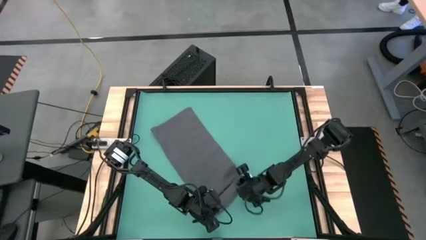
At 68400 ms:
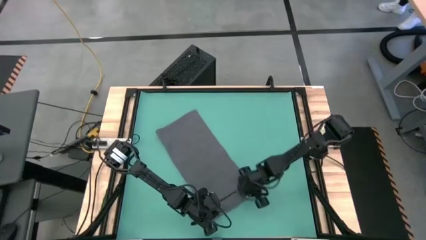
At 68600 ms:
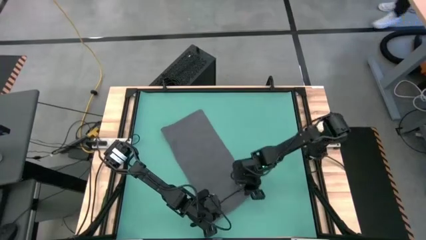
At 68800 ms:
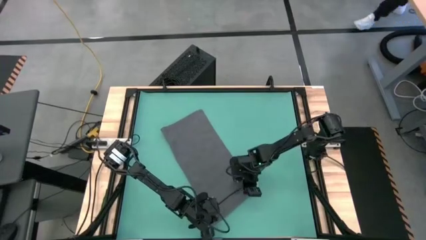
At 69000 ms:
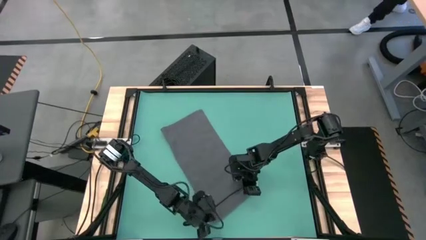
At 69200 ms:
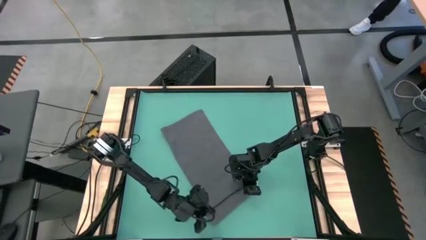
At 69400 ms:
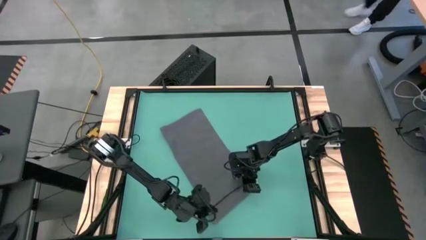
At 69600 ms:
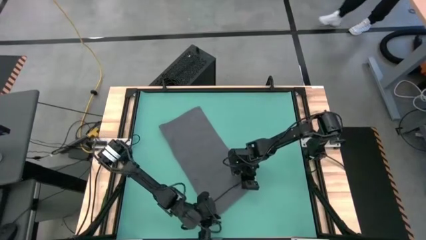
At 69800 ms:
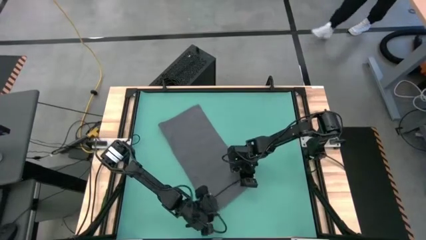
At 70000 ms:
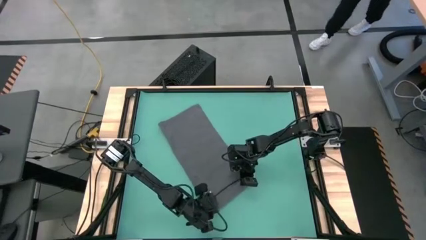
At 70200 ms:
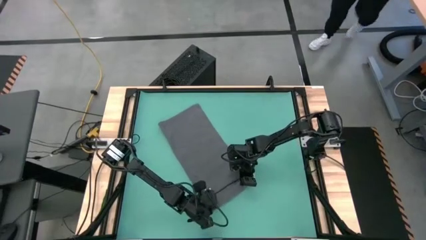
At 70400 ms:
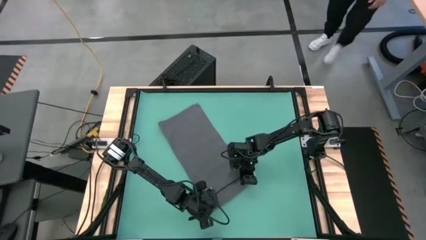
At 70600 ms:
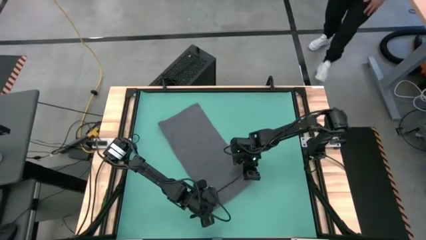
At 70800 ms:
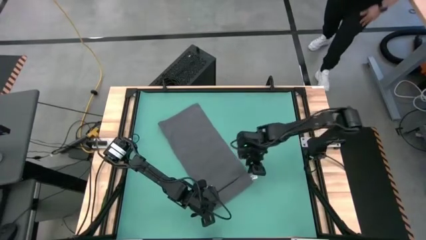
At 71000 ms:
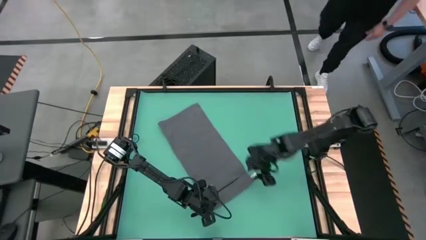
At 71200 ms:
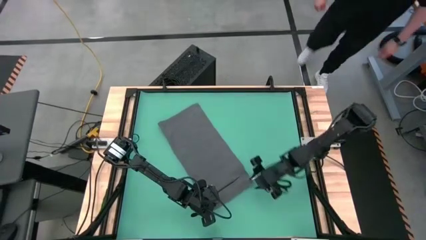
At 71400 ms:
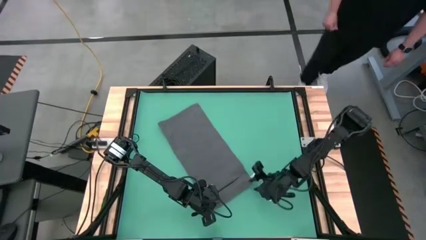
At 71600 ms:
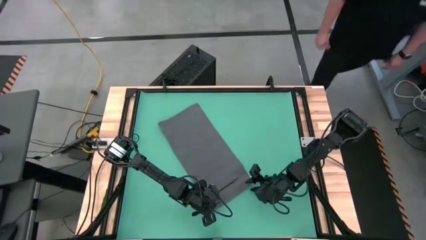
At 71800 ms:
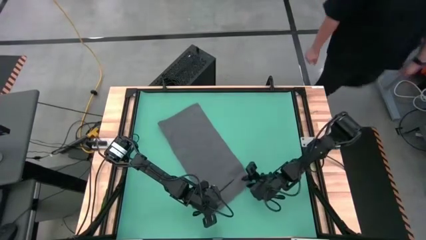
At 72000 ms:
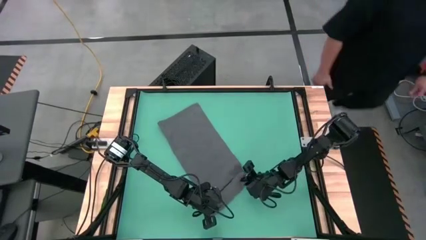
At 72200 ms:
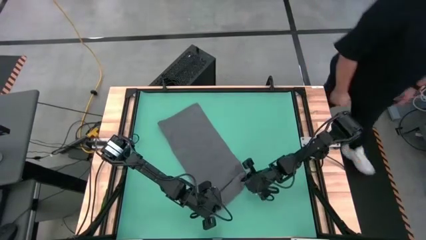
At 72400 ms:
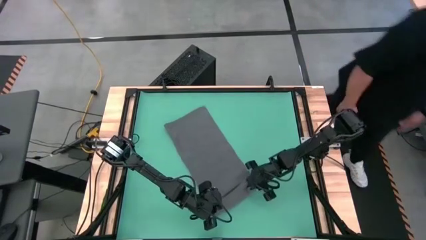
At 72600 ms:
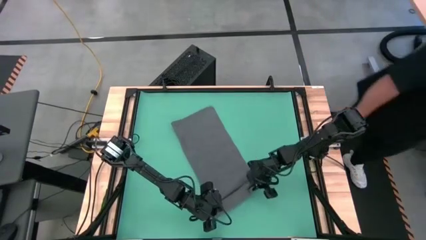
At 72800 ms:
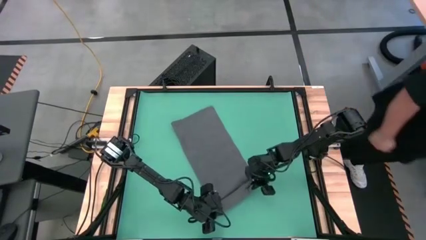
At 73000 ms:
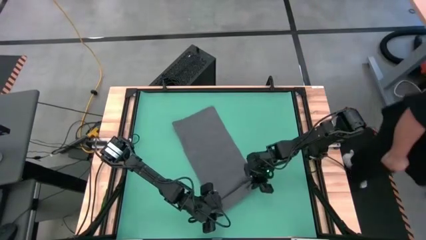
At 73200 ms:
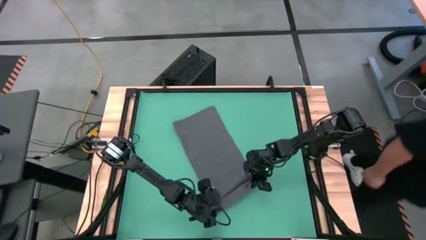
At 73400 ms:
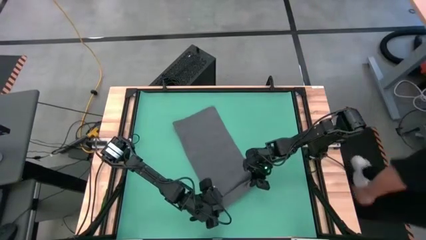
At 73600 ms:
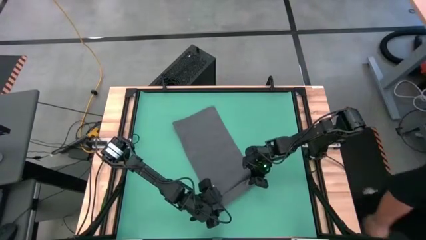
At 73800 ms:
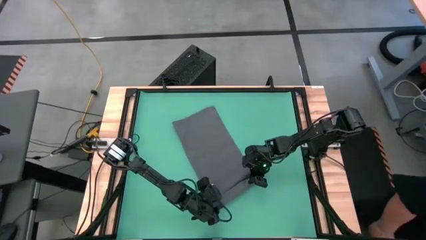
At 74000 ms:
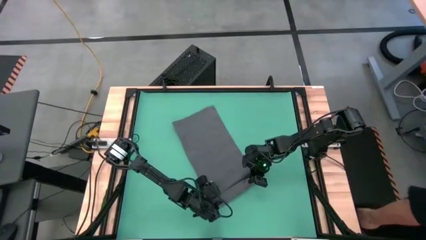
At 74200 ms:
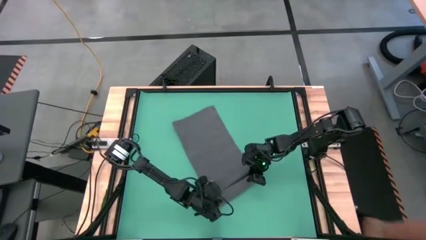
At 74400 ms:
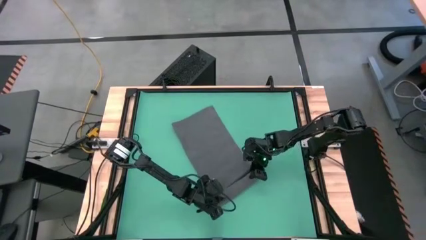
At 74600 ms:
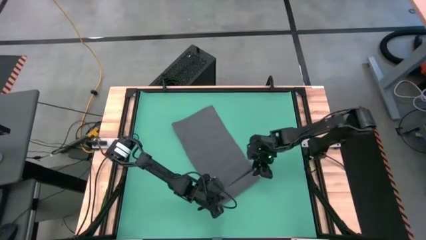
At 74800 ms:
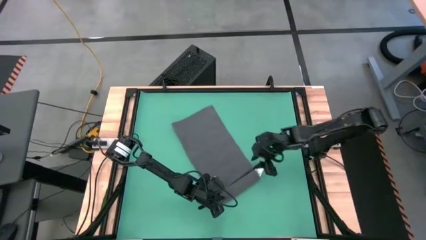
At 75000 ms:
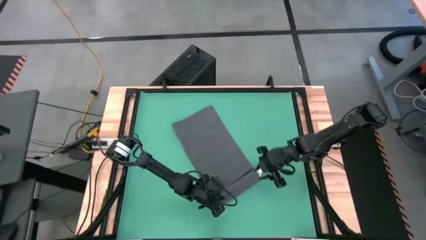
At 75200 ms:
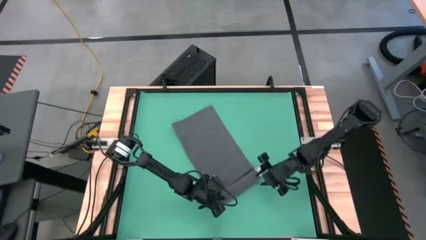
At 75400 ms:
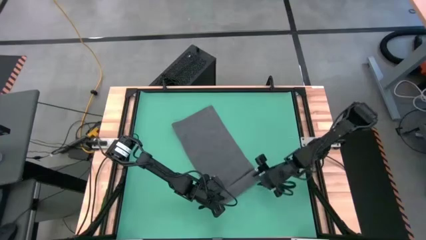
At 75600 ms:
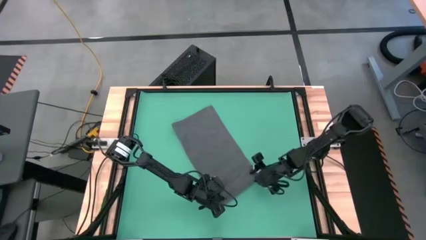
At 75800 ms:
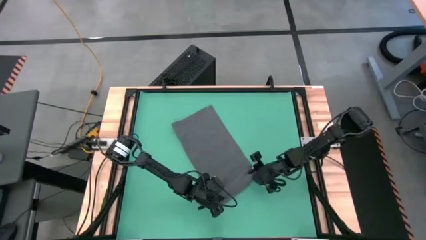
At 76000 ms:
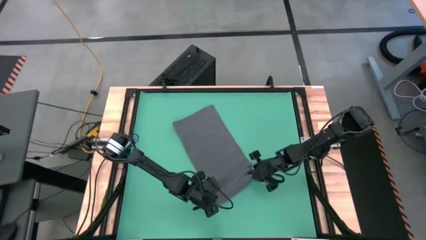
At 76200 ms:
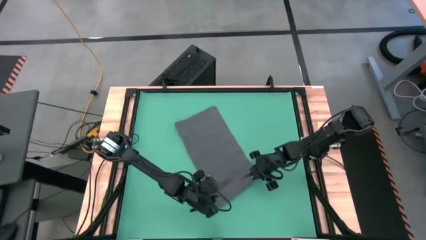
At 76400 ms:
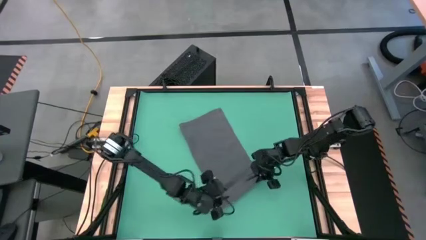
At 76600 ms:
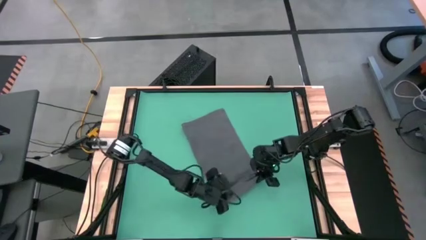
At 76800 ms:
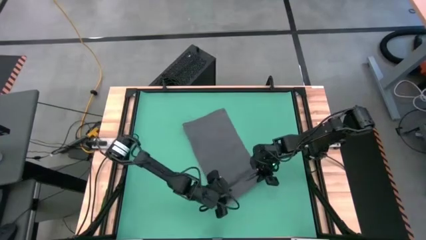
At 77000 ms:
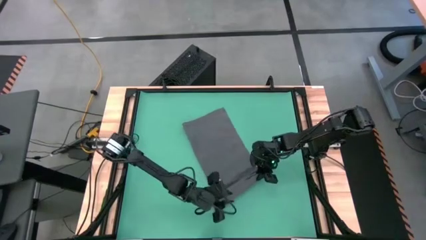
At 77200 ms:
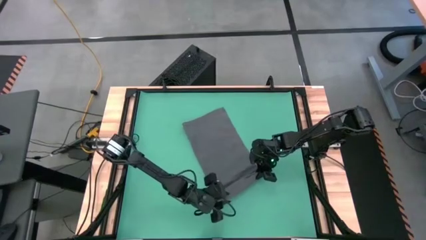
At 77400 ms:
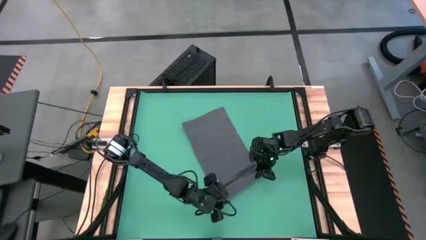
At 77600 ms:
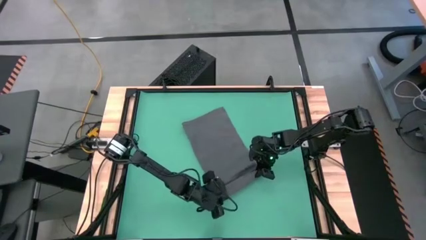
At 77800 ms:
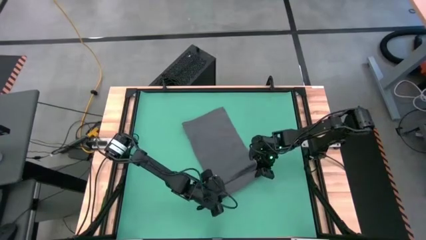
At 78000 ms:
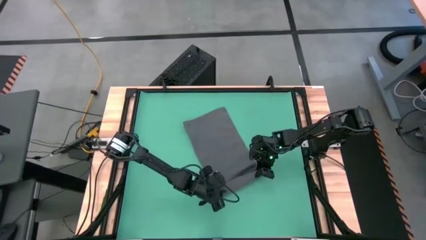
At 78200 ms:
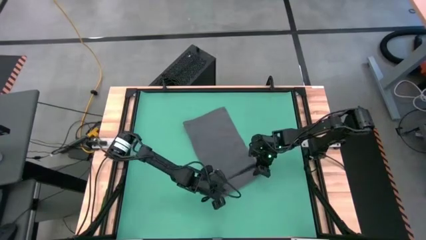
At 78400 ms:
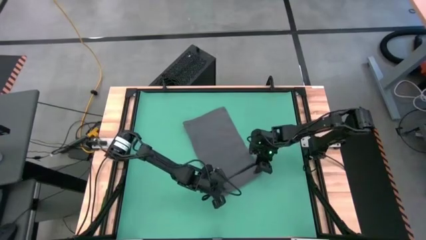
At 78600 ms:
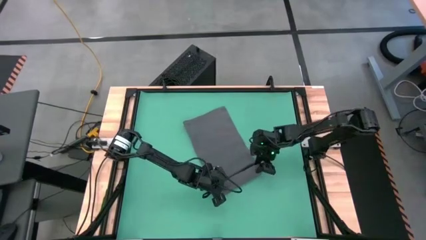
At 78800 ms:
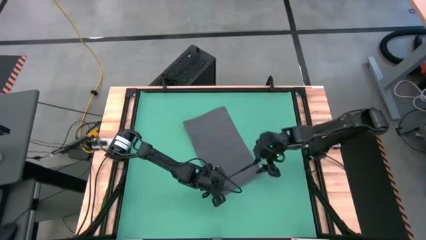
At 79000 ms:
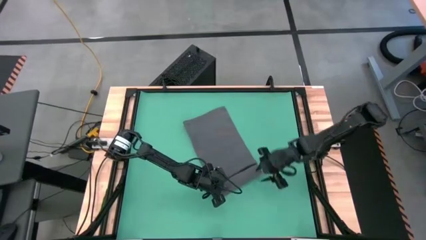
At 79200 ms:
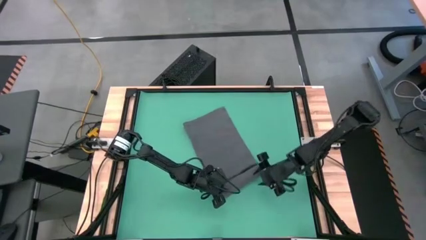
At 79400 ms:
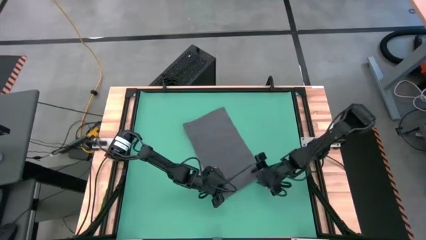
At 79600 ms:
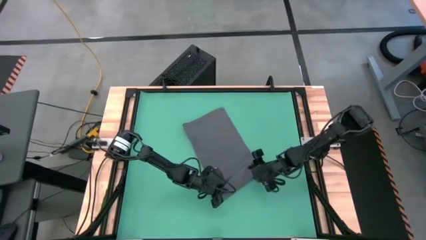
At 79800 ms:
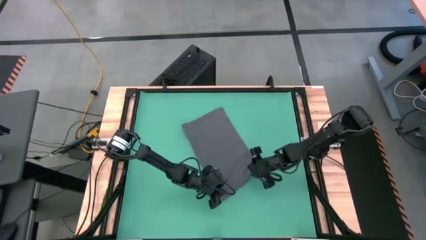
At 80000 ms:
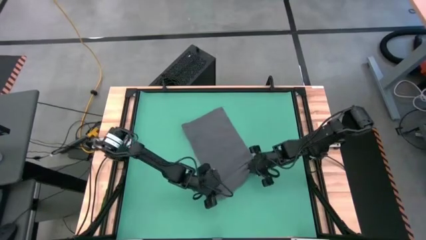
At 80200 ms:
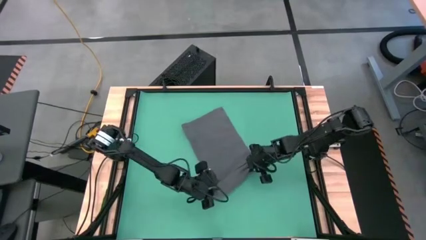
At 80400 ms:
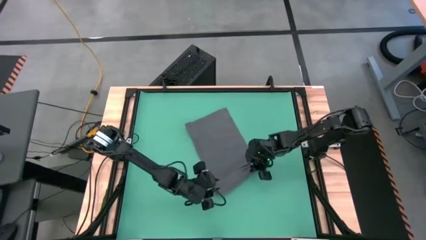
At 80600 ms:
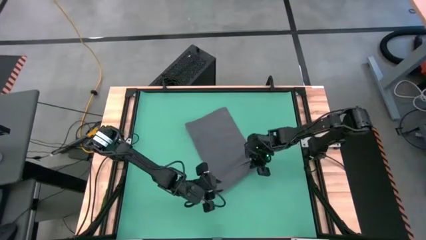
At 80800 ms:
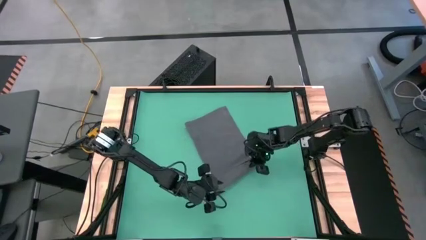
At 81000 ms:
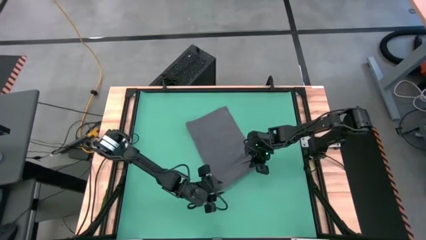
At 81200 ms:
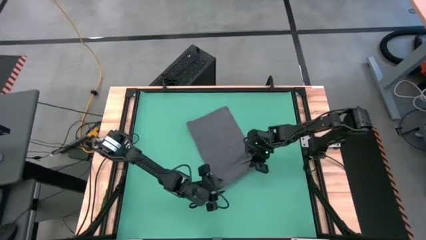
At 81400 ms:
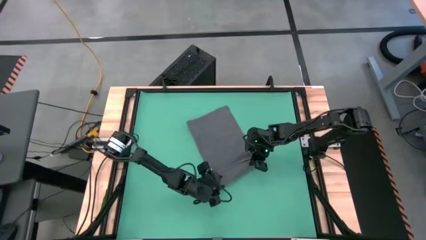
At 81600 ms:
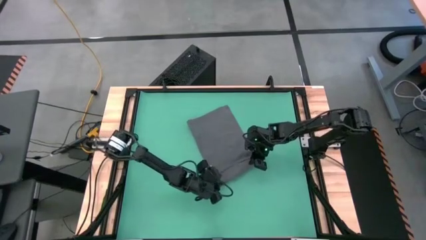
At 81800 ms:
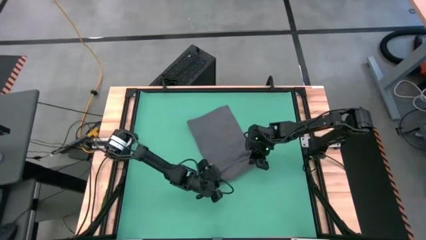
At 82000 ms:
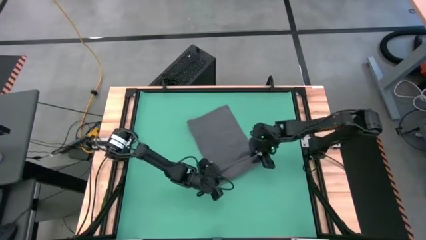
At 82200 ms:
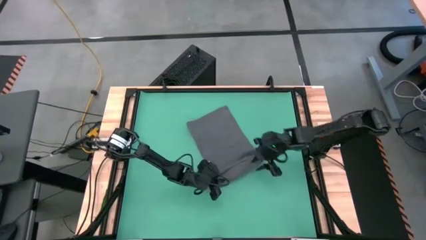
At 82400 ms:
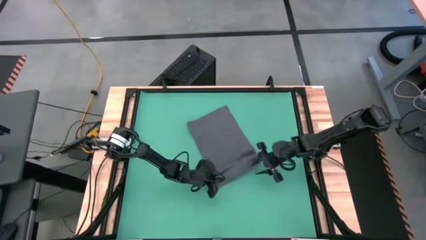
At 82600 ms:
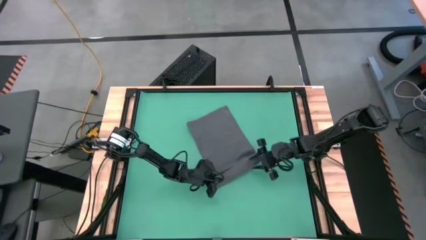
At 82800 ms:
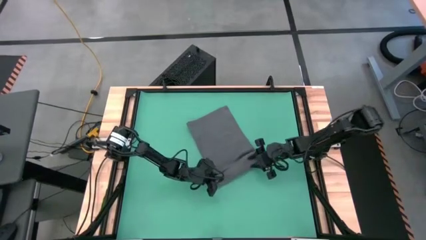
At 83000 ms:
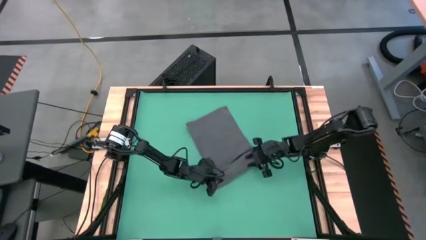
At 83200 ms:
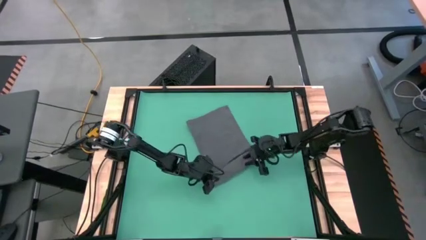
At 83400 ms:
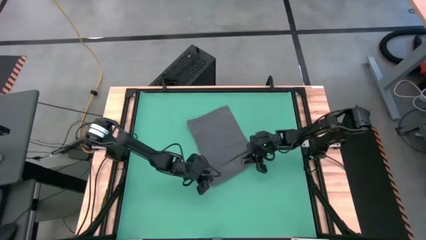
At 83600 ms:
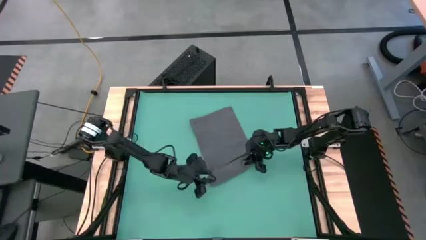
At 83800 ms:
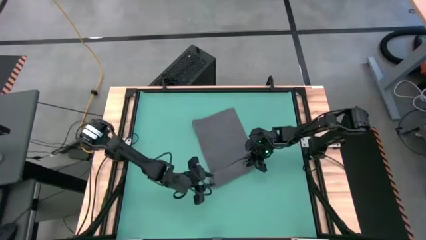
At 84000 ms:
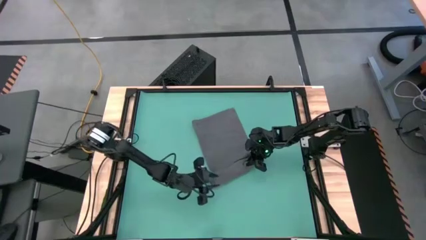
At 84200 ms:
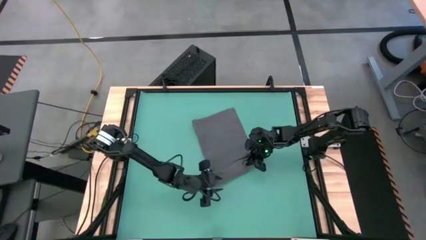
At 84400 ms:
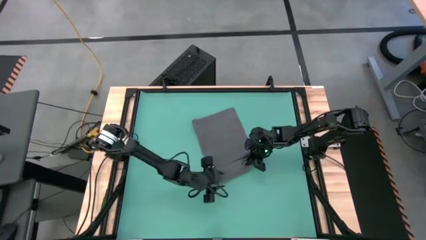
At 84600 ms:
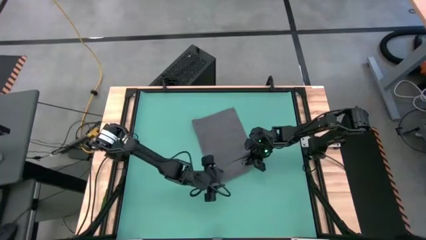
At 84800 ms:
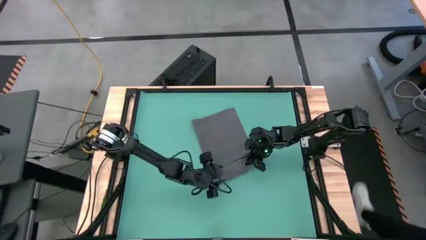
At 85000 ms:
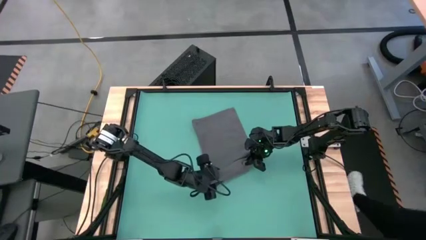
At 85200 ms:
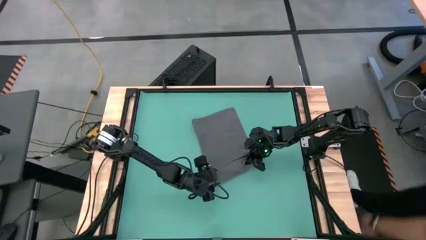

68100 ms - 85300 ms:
Task: Roll towel into tight, uniform cylinder
Roll the gray towel
